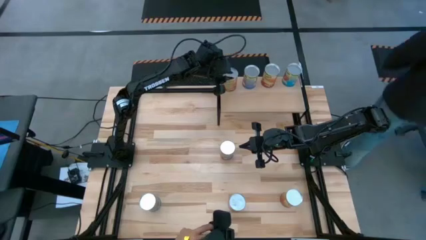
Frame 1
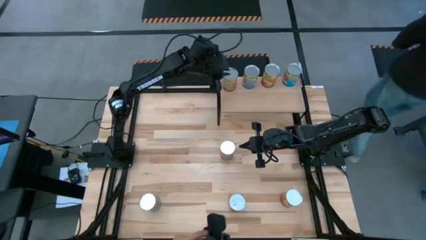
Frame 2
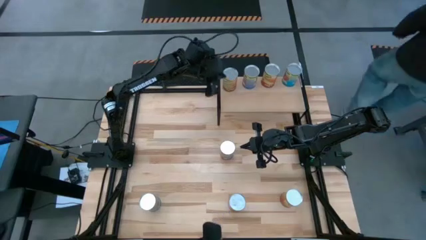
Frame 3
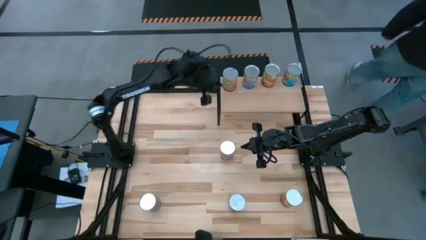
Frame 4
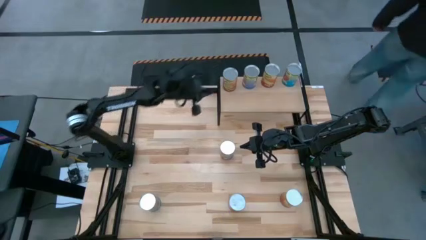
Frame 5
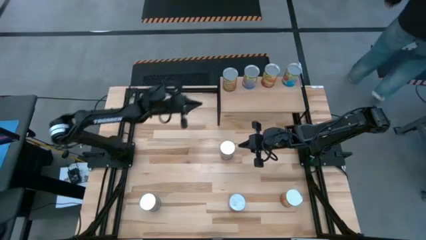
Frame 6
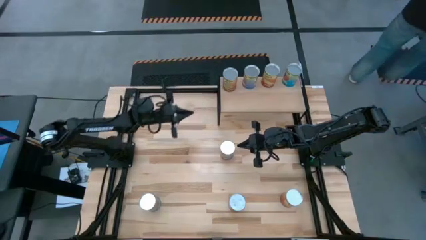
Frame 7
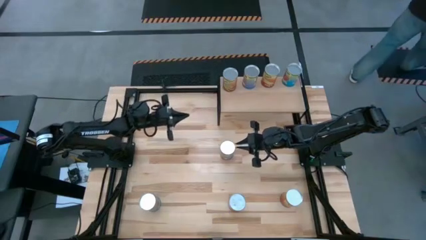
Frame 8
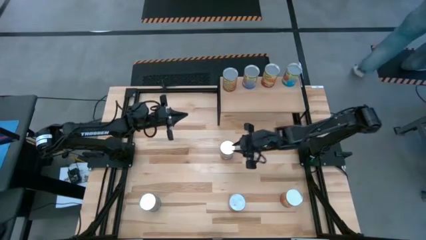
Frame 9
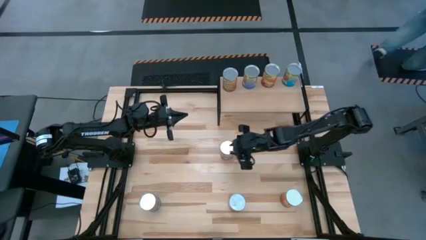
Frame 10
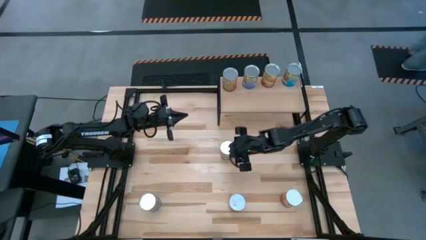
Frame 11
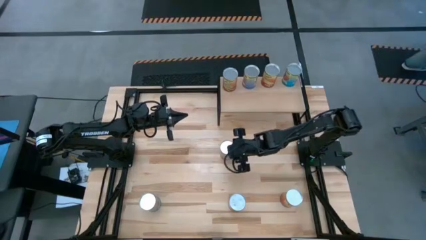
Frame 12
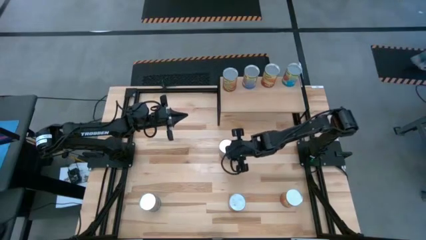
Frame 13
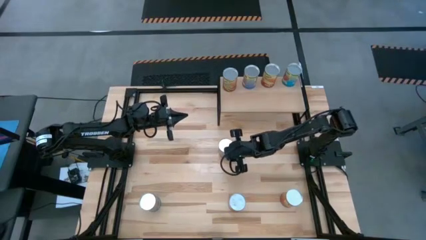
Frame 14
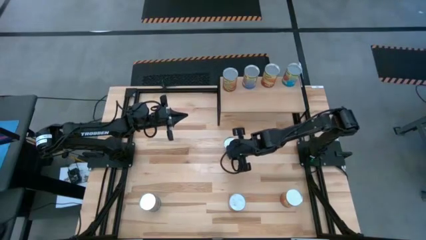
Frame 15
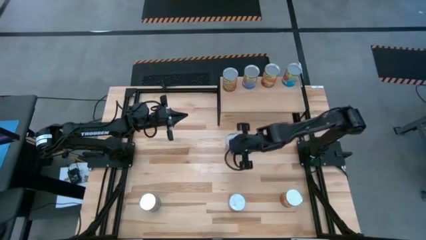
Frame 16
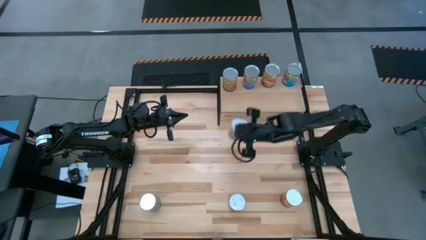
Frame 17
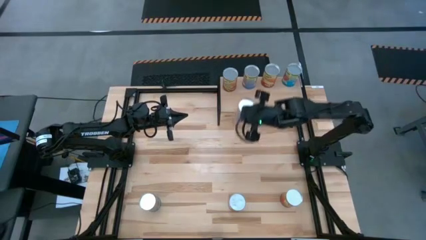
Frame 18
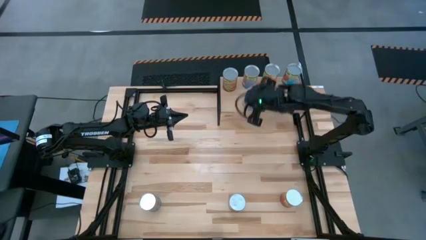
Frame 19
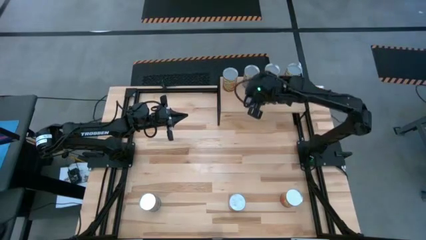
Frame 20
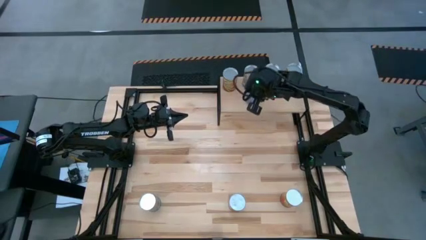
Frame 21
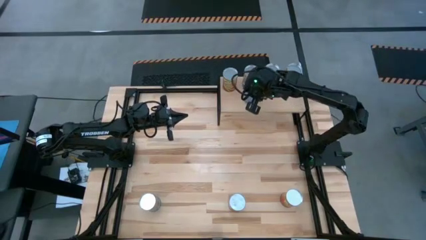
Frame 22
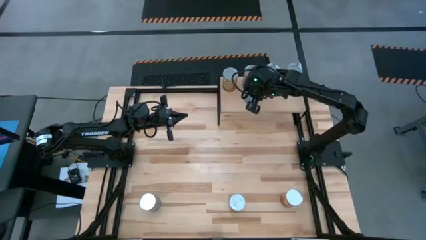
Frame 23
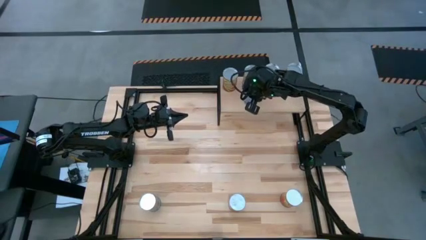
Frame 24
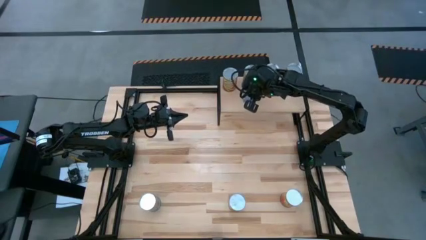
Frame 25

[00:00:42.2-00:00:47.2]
Task: Pick and place cans onto a shelf
Put the canned peaches on the shelf aligned with the other canned peaches

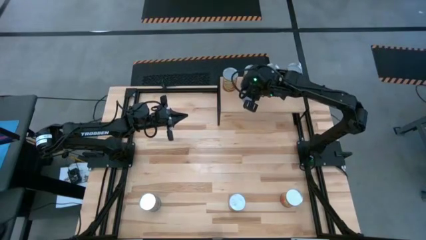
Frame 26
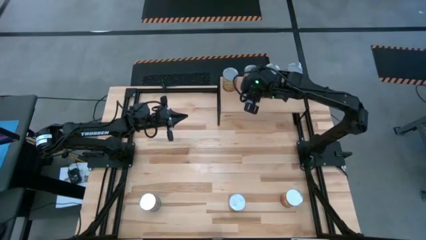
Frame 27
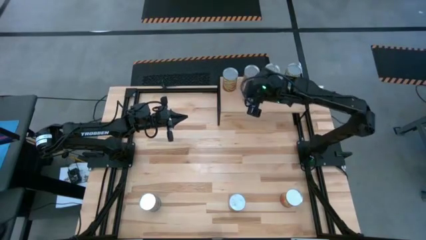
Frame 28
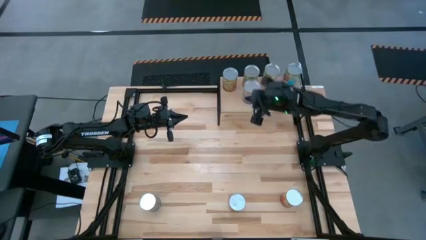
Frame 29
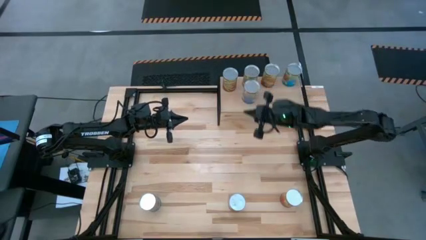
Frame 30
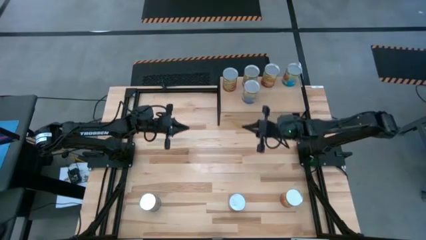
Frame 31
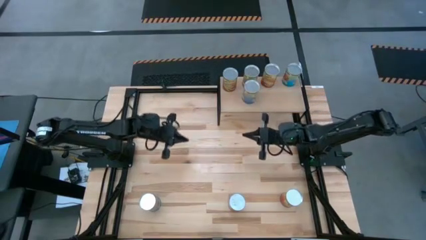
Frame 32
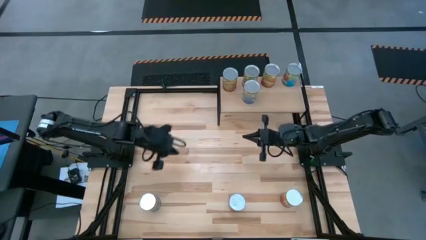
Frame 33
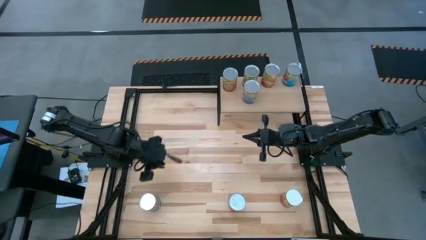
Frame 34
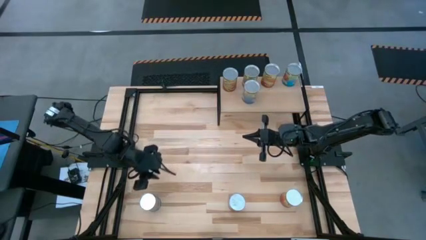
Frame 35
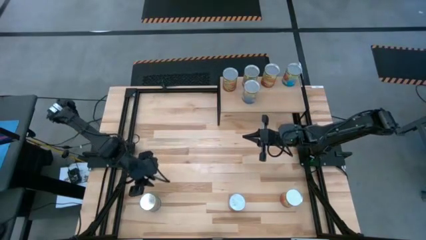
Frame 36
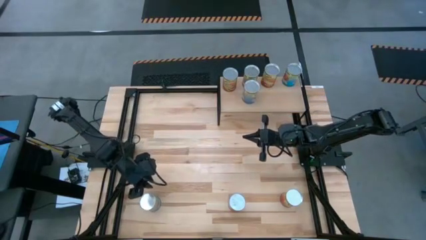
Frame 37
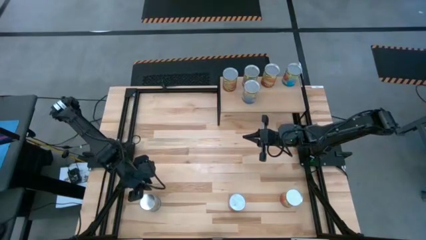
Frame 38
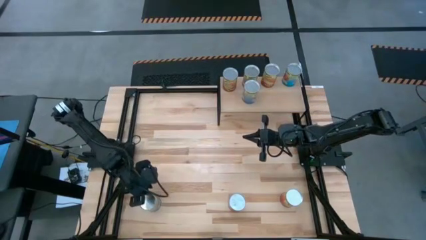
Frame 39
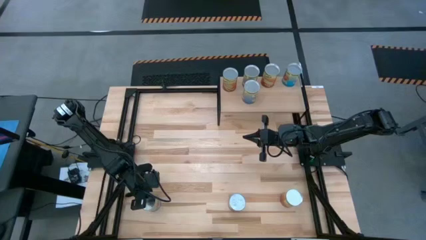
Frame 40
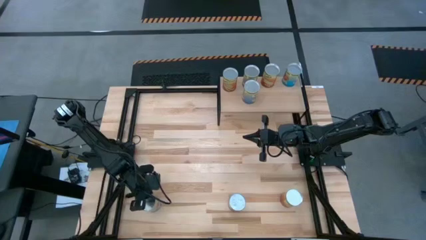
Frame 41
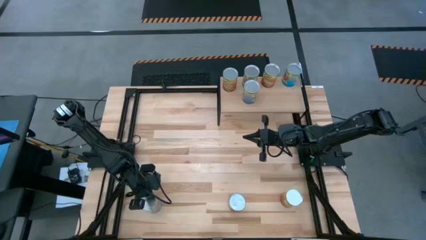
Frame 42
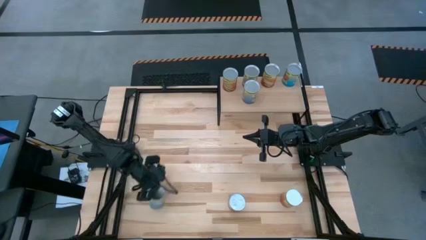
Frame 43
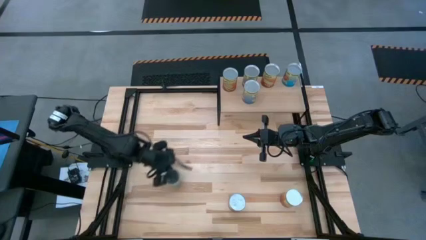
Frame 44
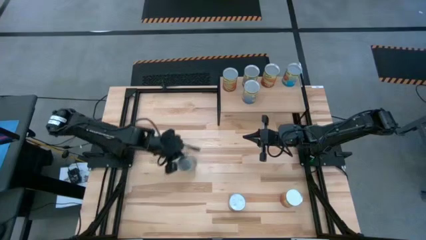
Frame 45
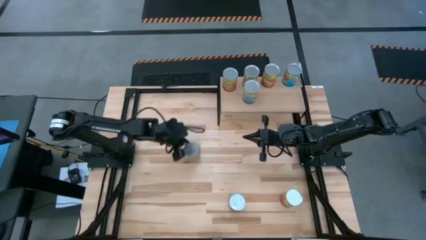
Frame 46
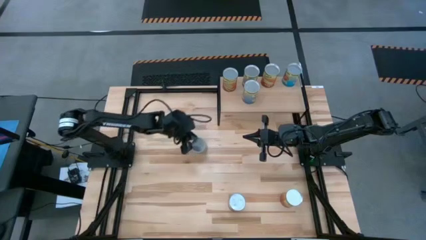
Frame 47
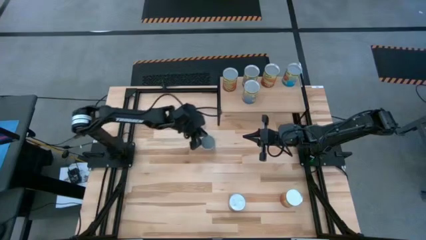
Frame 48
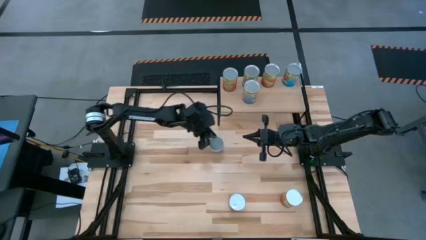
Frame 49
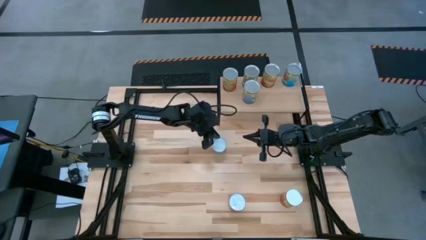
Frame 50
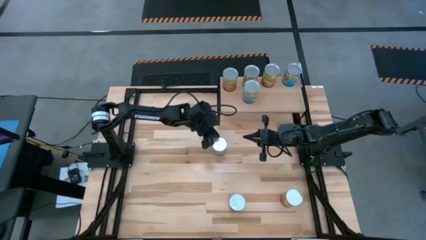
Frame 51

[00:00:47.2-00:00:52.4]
Move the canned tomatoes to the center of the table

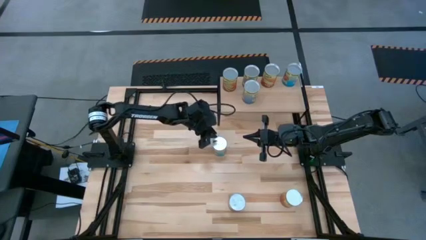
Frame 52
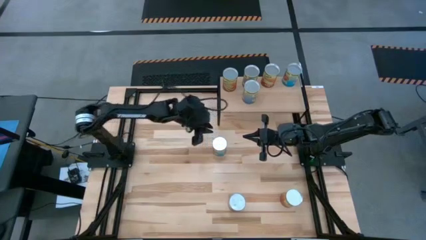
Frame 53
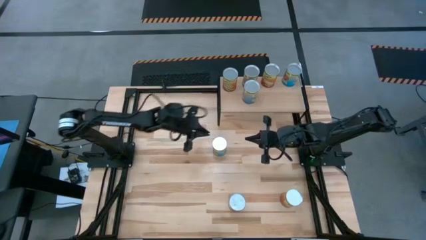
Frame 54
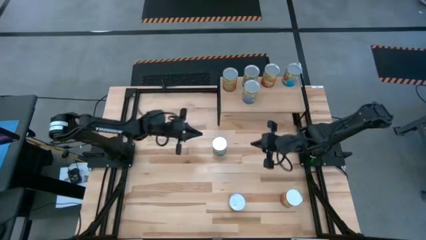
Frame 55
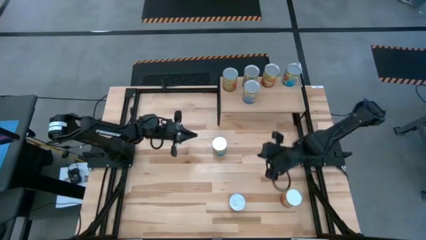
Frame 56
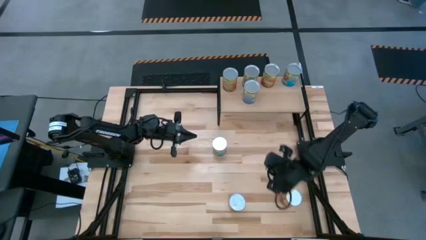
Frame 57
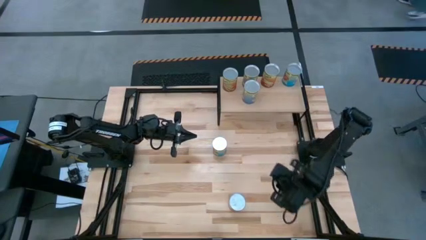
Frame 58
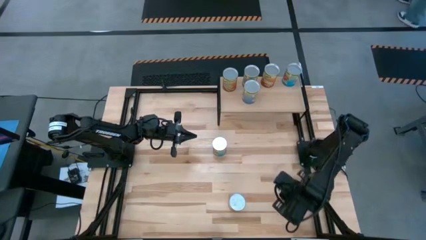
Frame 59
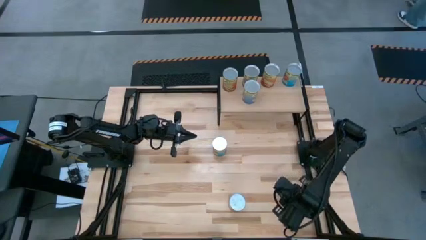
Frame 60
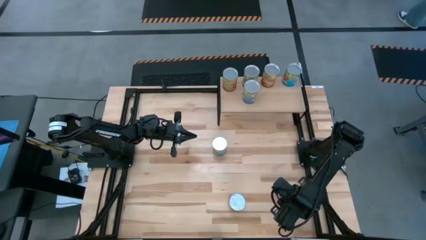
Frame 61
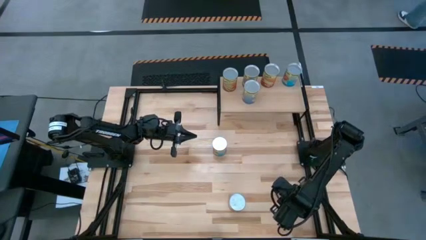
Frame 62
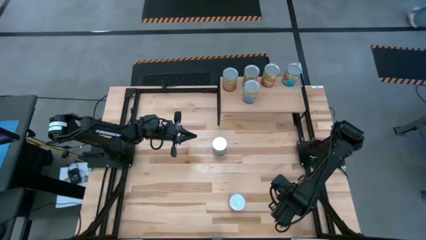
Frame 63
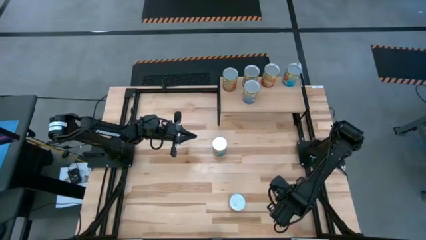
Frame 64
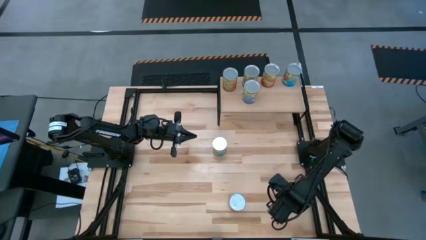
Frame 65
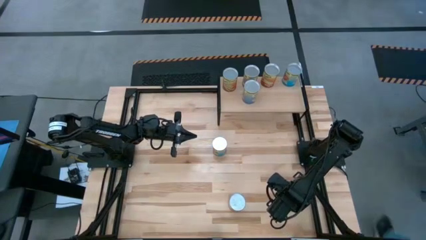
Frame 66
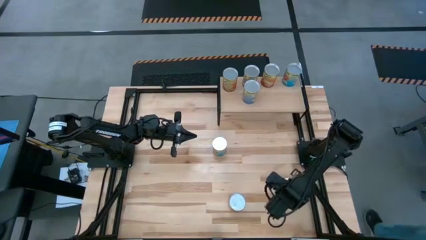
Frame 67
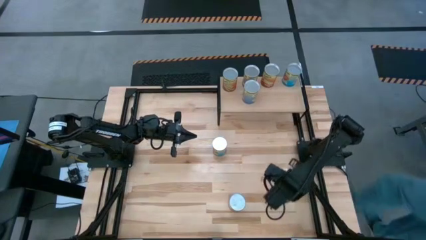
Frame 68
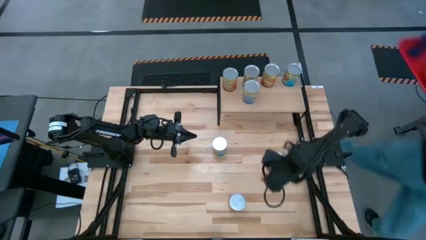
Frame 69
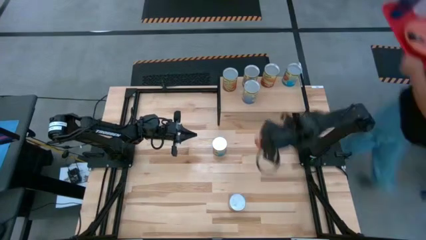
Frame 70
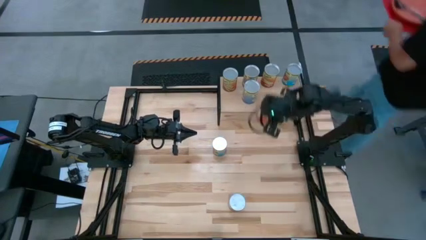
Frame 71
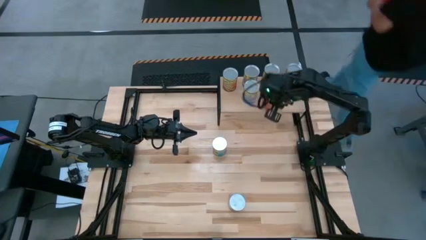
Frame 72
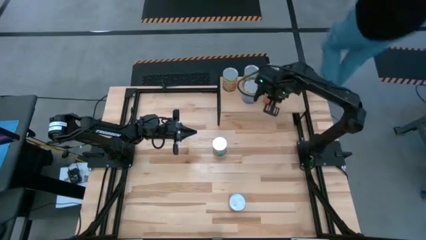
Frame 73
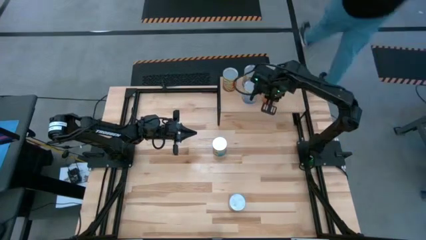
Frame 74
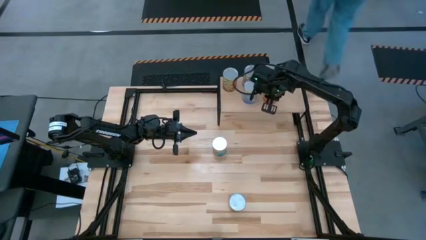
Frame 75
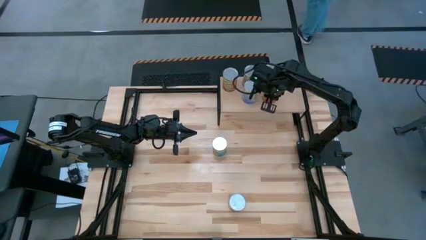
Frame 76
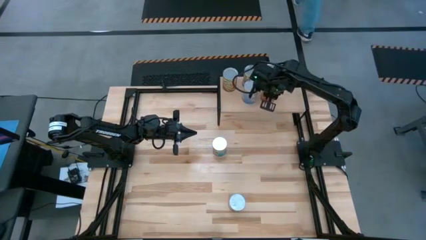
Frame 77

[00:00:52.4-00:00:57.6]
Put the canned corn on the shelf aligned with the other canned corn

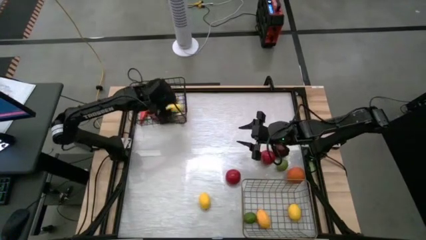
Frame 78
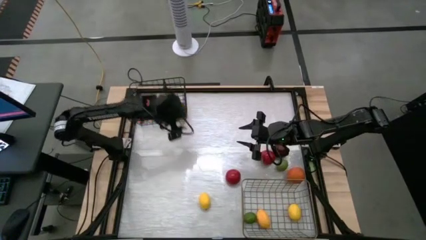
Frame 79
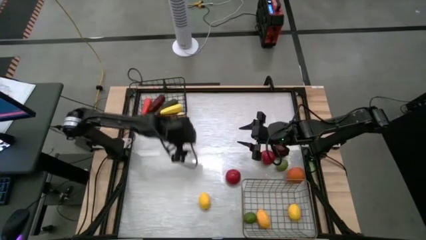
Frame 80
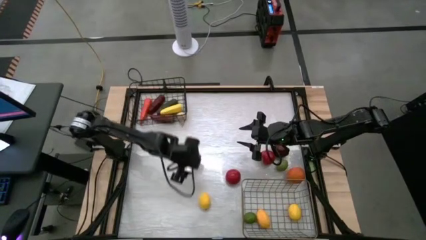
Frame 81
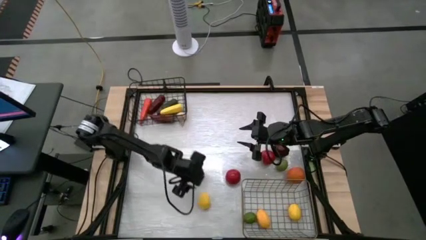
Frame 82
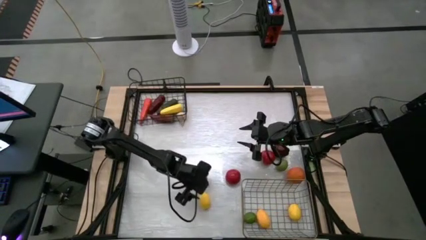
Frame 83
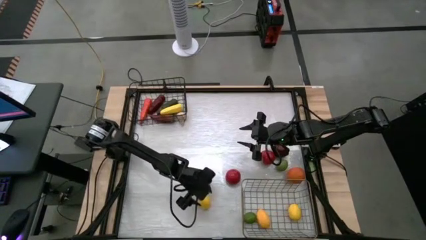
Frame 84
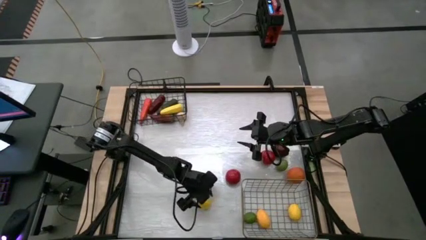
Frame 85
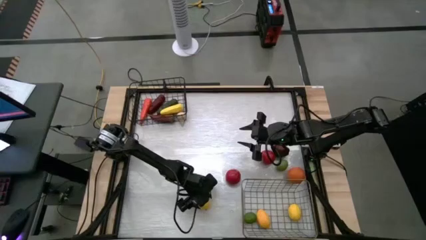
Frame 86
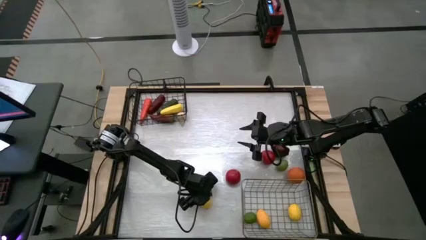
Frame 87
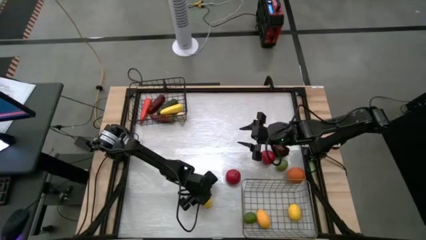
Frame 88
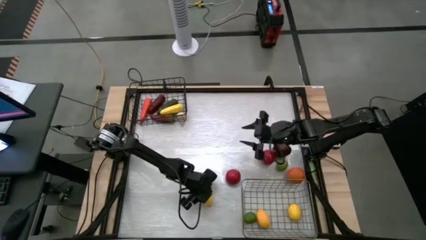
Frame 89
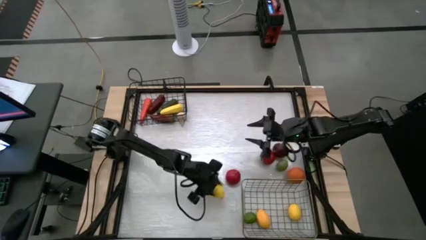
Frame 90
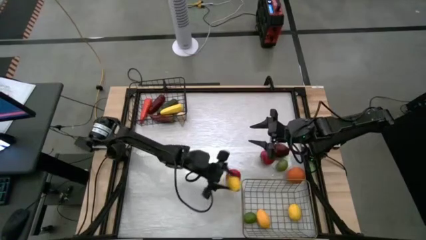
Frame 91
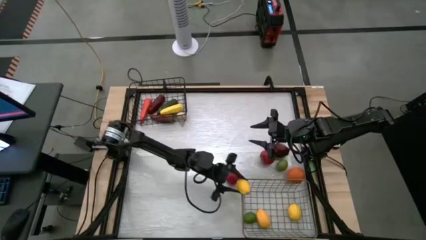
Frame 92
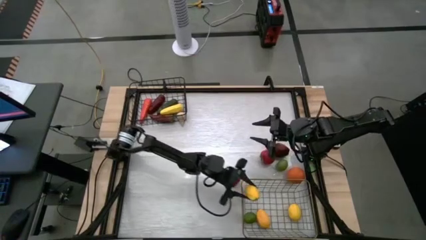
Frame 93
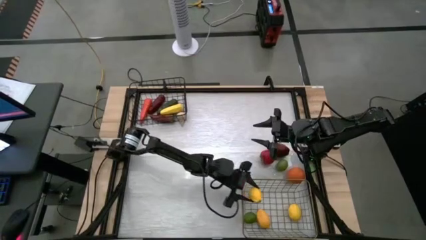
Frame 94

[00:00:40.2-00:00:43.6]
Task: Sort produce into baskets
Put the lemon into the gold wire basket
